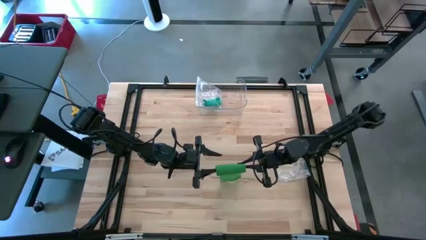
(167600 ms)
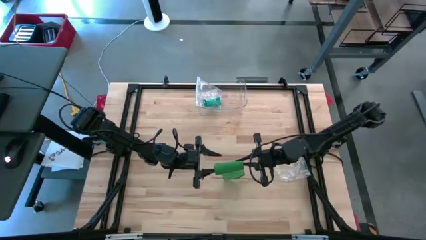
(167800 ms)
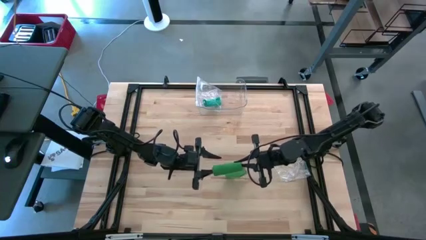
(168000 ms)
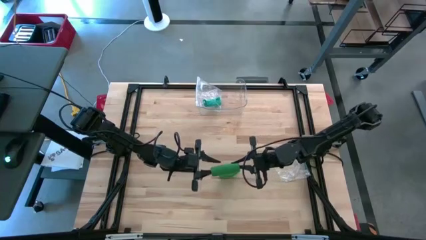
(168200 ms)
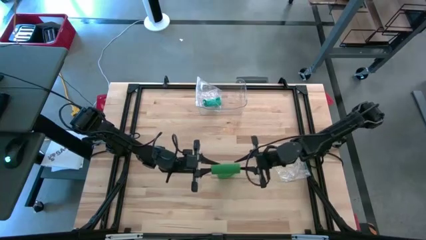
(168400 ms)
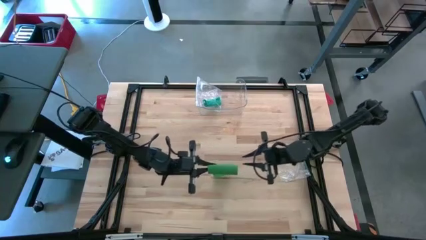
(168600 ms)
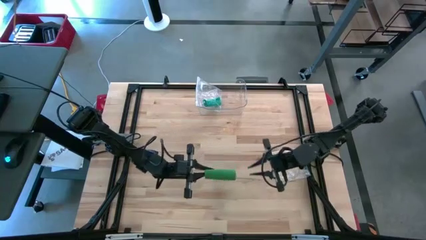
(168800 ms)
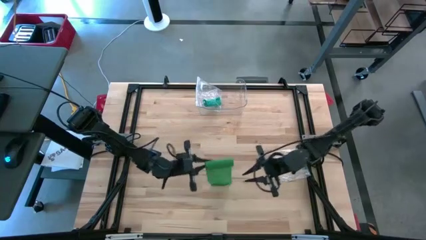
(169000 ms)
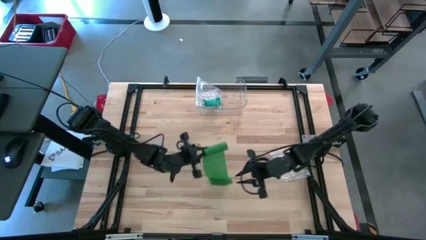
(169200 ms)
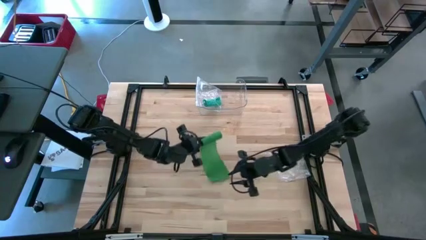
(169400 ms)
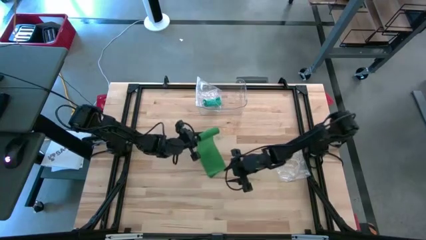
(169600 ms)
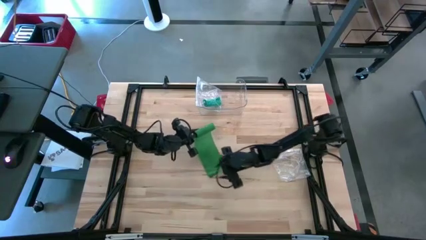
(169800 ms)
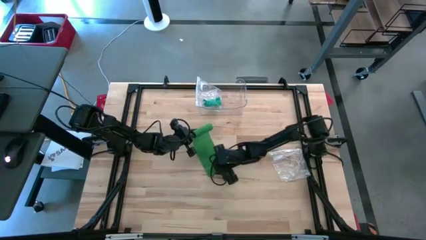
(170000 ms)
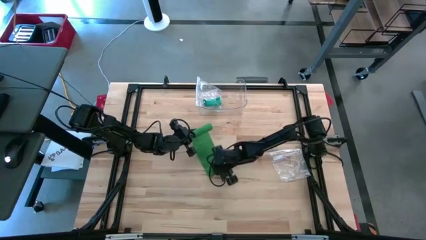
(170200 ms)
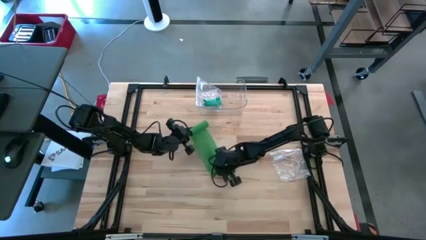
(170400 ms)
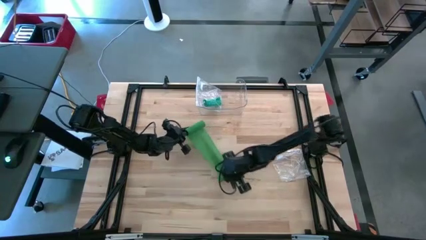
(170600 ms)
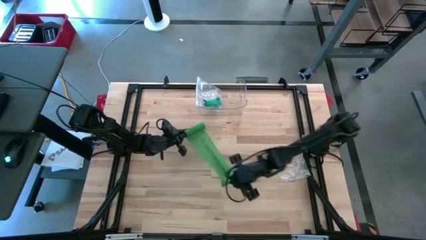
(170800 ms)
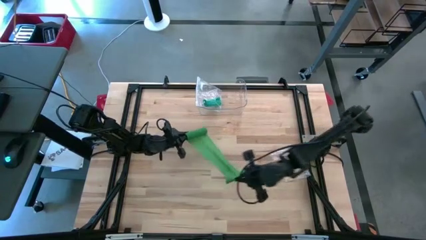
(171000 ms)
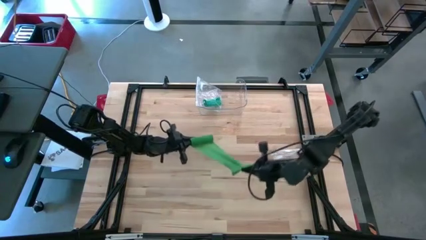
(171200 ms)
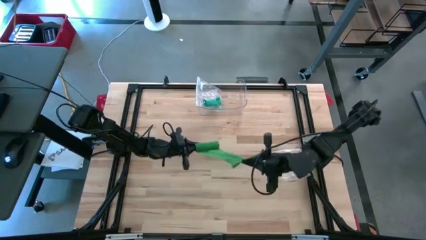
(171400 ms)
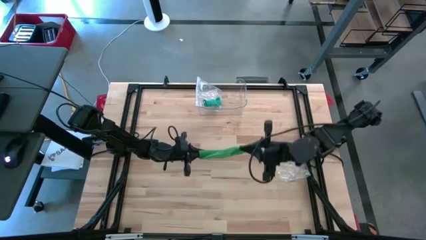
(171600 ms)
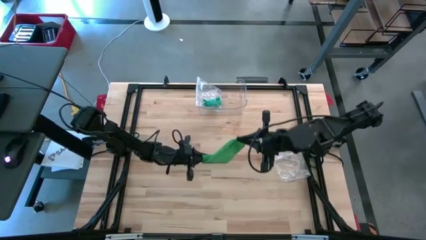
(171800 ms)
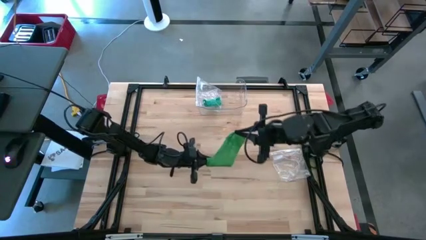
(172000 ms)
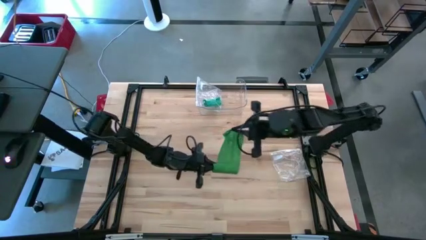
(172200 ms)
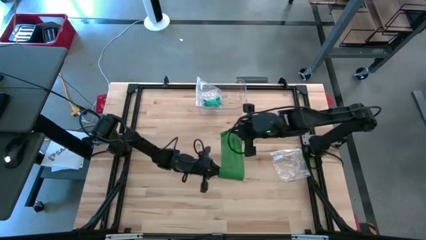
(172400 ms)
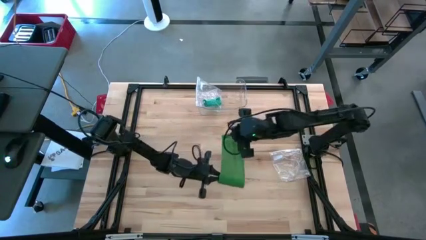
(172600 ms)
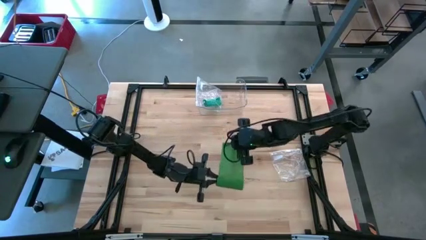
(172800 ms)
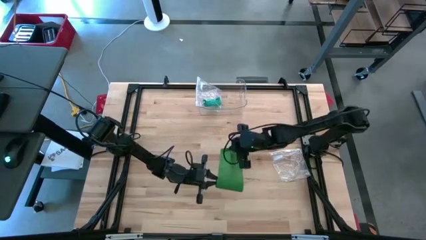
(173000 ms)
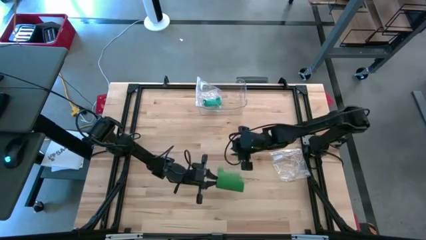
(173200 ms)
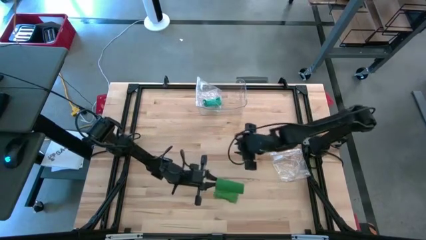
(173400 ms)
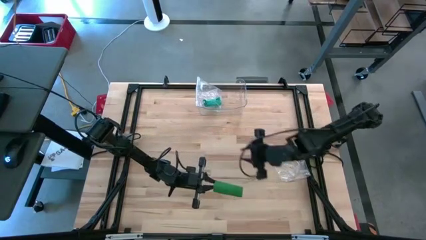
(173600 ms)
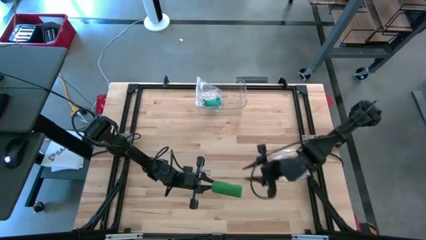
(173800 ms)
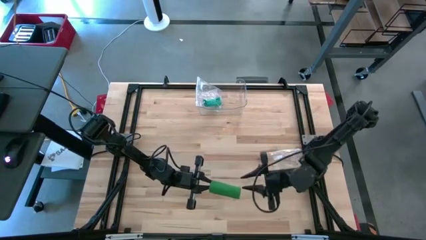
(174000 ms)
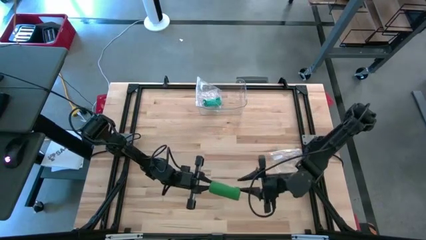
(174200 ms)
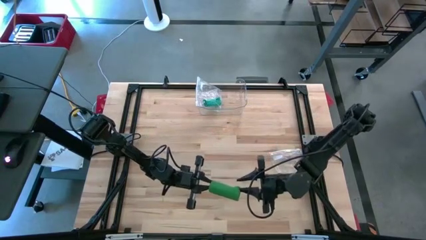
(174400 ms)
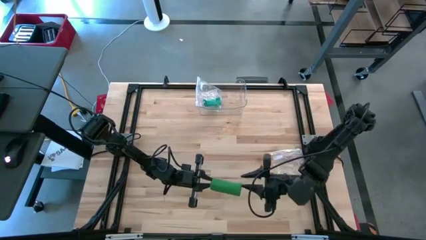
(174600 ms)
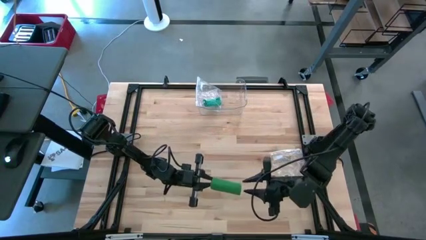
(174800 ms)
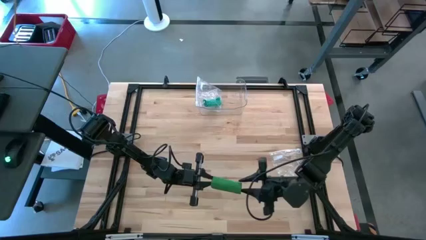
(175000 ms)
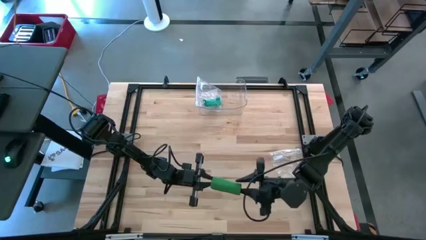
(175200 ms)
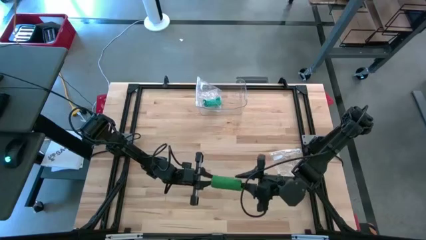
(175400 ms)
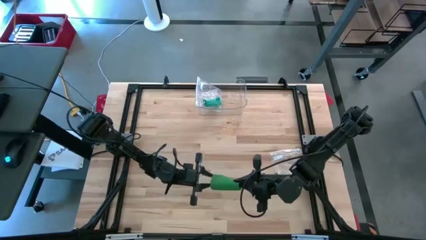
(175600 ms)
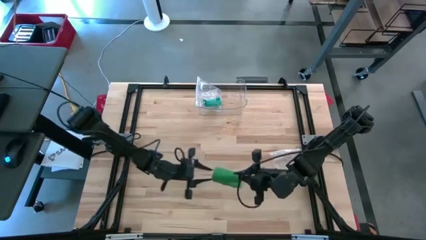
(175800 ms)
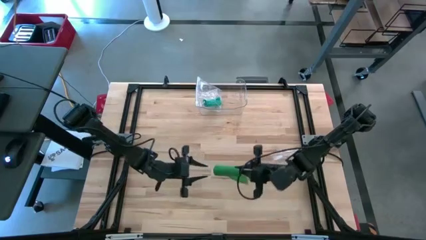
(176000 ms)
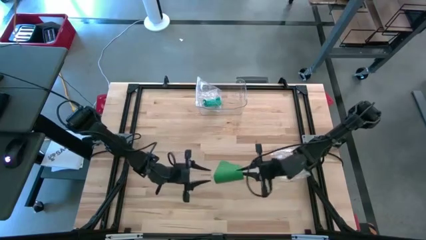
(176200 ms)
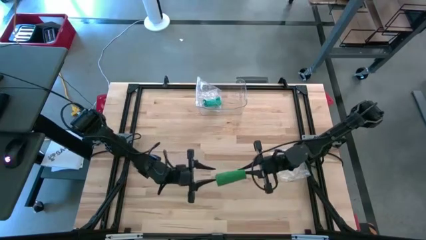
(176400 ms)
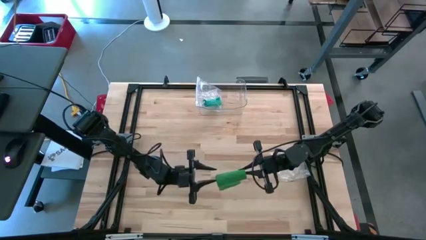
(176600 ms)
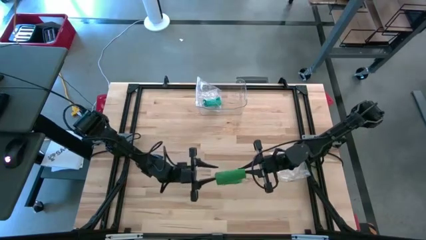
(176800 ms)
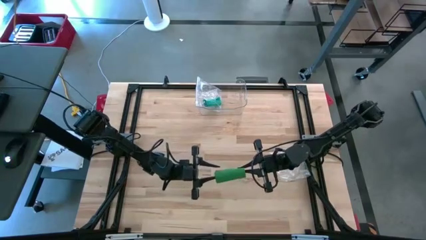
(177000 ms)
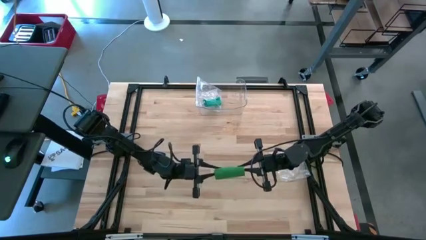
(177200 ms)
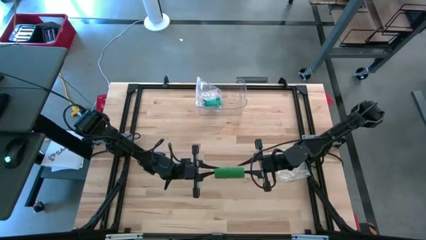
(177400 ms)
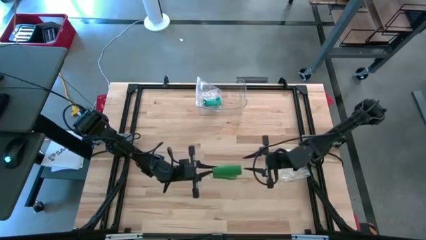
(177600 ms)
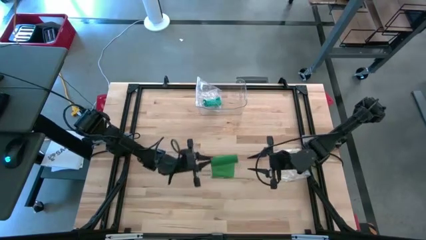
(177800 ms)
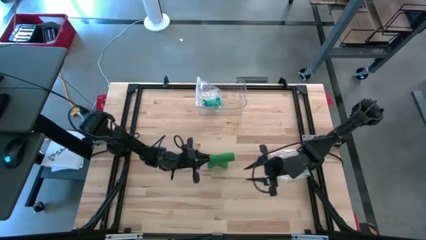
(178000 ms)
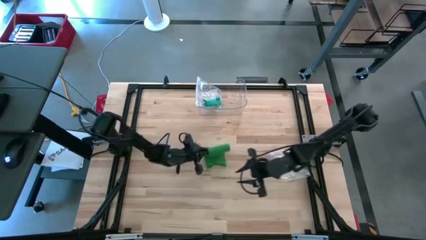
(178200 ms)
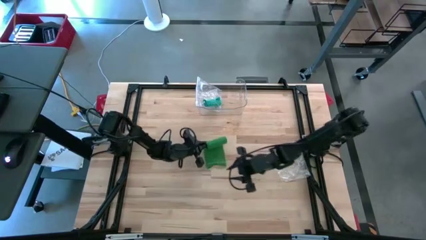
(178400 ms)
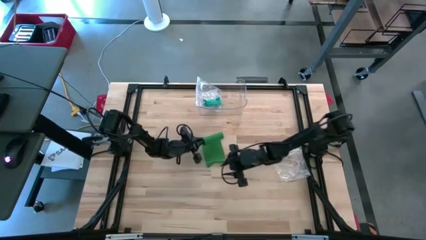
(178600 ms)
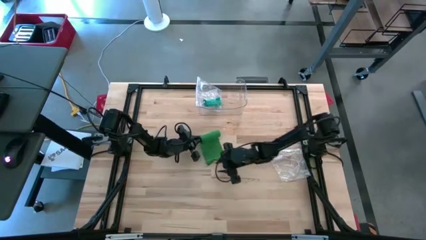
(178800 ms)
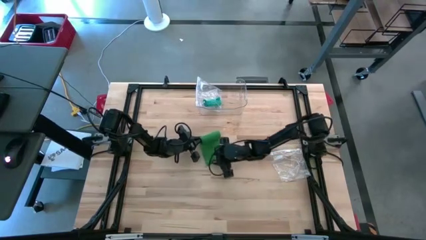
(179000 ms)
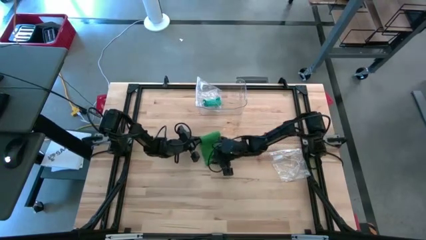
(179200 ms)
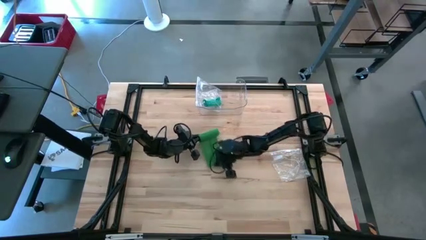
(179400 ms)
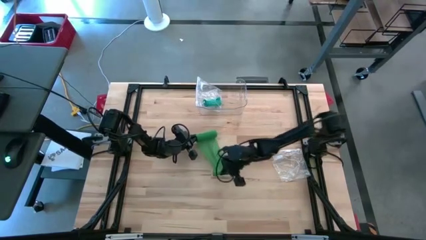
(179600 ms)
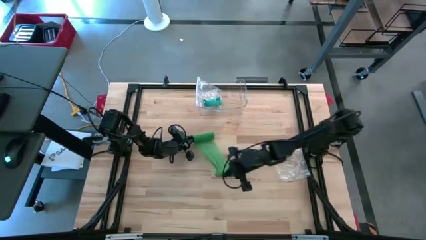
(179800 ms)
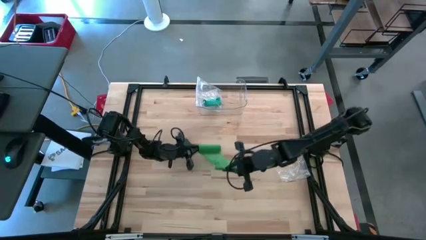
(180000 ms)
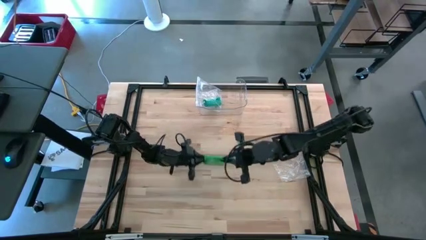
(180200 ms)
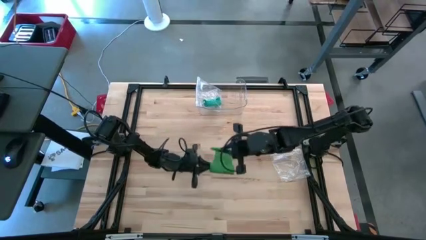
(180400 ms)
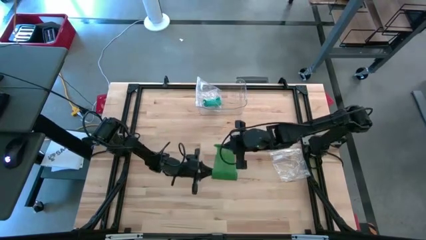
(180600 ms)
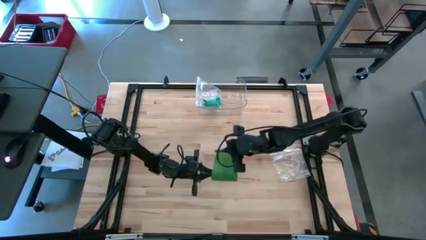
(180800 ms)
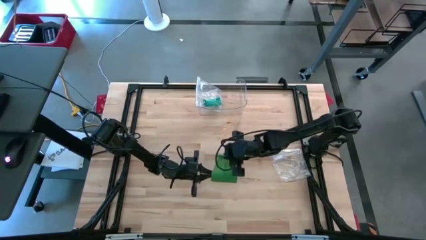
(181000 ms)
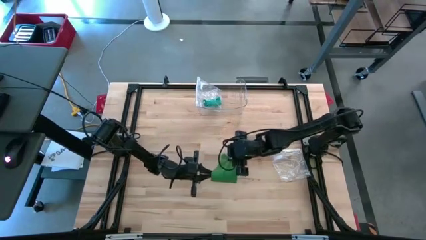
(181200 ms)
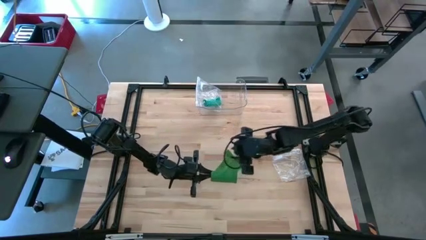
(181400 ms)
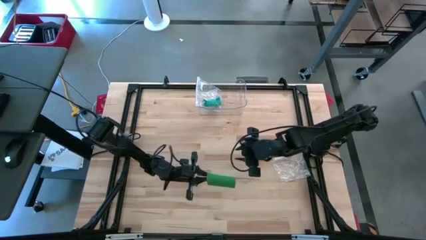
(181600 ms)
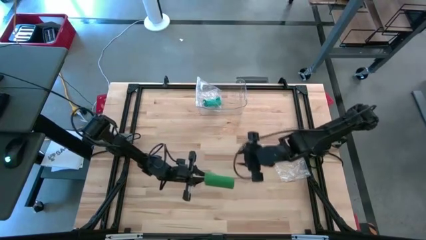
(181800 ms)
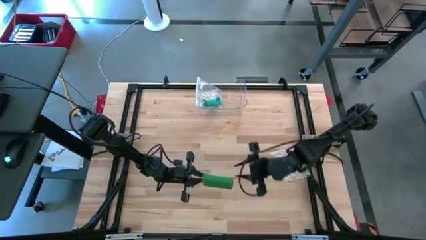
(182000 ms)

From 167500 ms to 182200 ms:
Task: Roll bandage
Roll the green bandage
